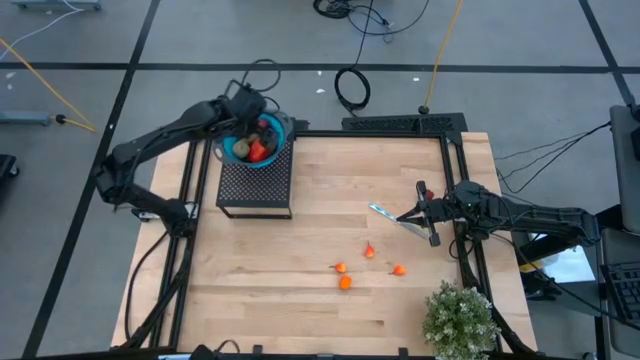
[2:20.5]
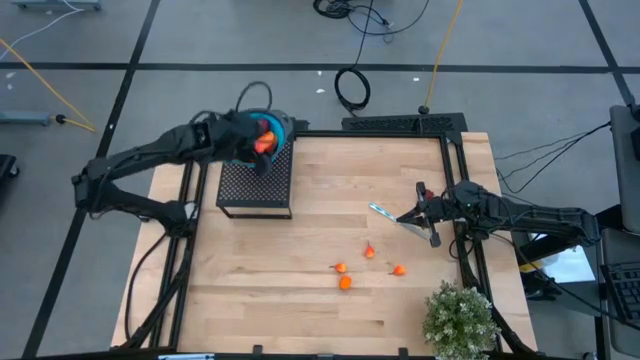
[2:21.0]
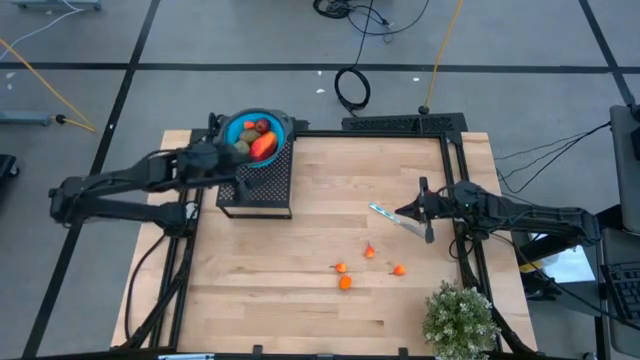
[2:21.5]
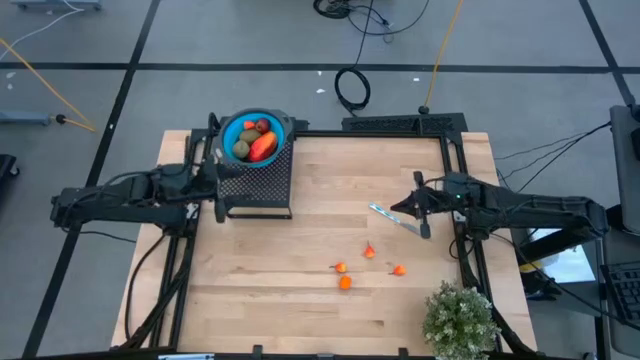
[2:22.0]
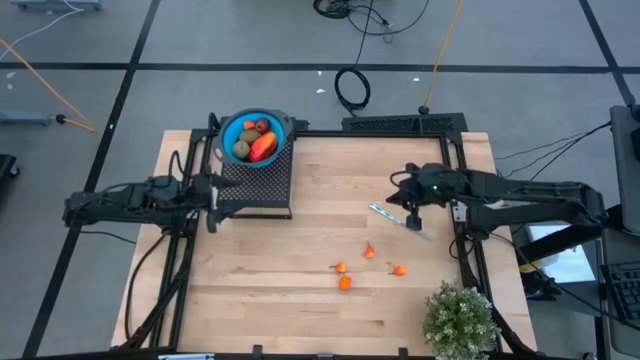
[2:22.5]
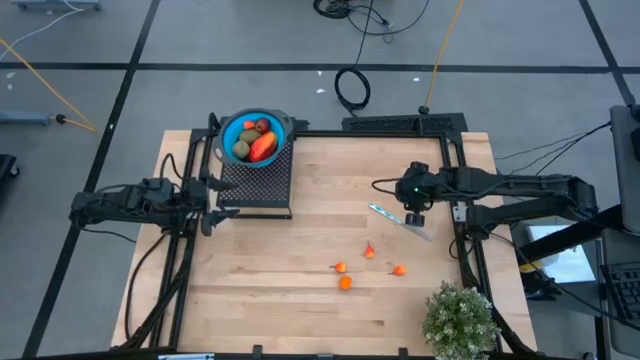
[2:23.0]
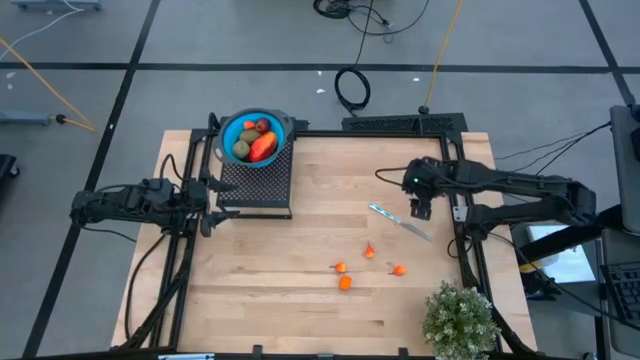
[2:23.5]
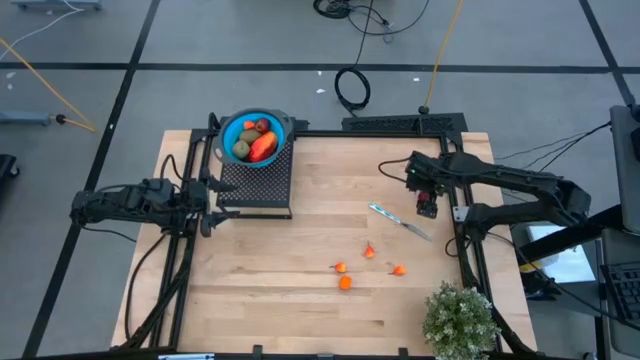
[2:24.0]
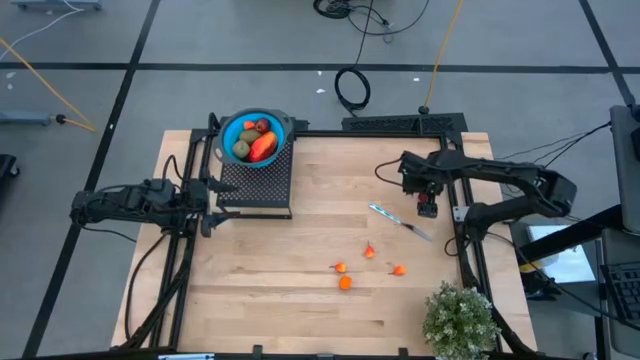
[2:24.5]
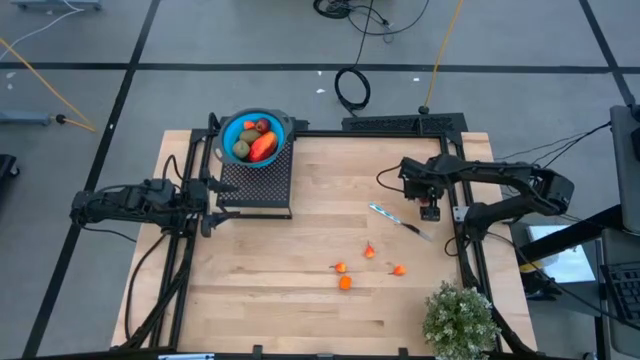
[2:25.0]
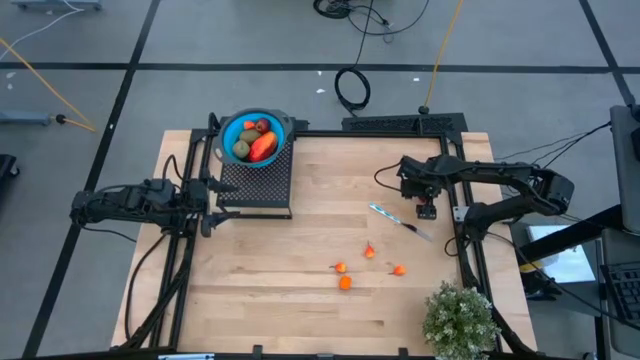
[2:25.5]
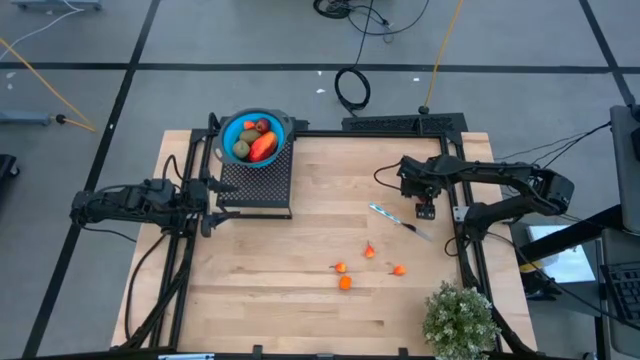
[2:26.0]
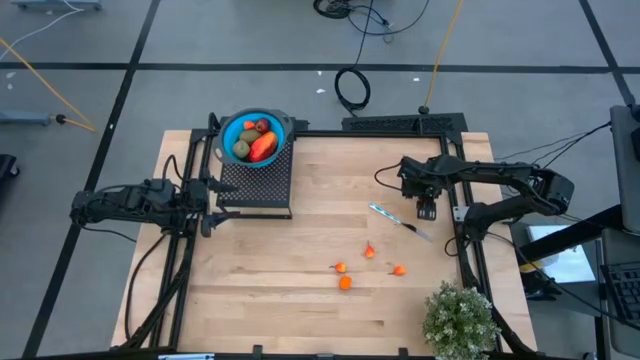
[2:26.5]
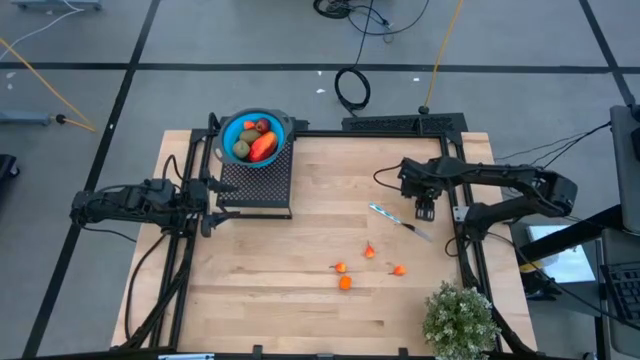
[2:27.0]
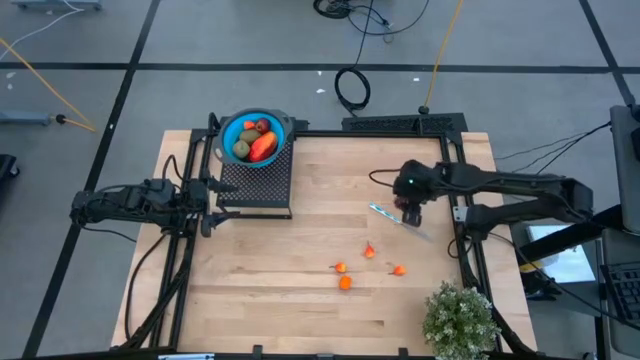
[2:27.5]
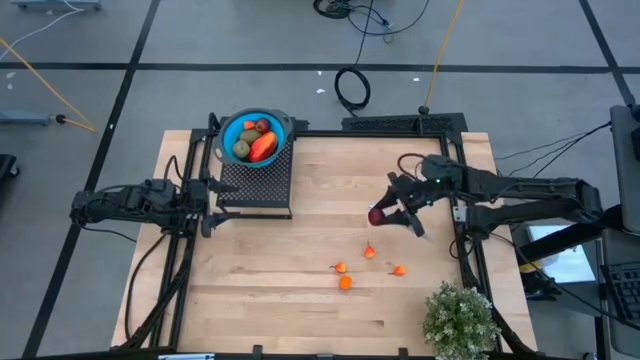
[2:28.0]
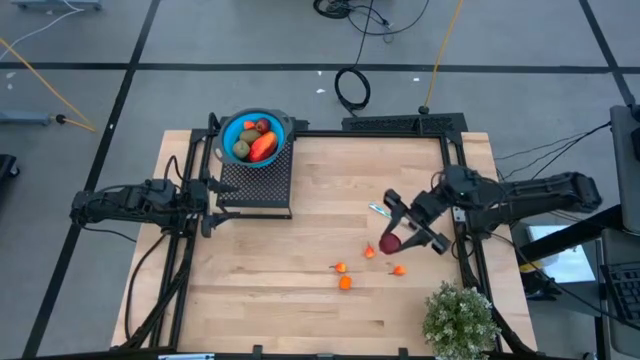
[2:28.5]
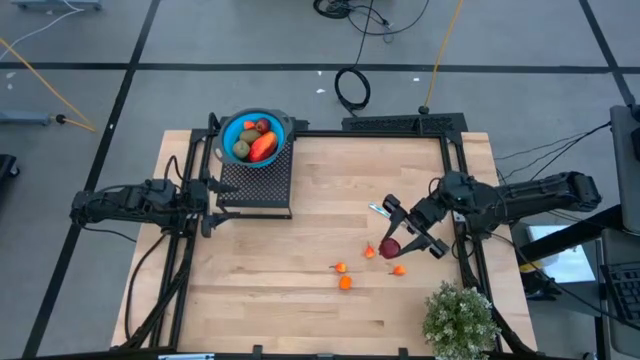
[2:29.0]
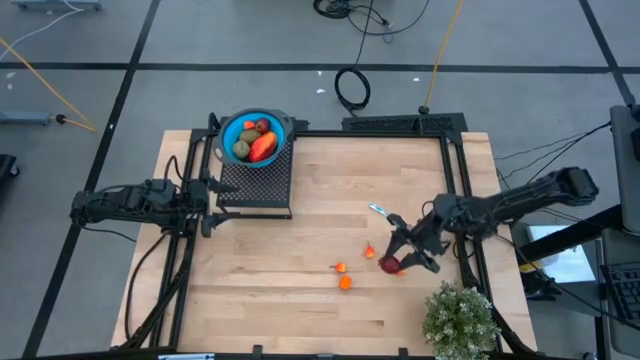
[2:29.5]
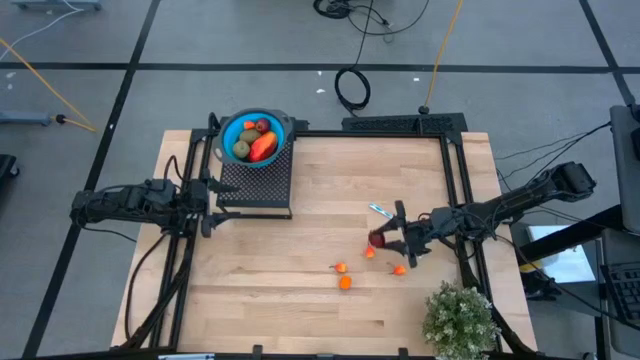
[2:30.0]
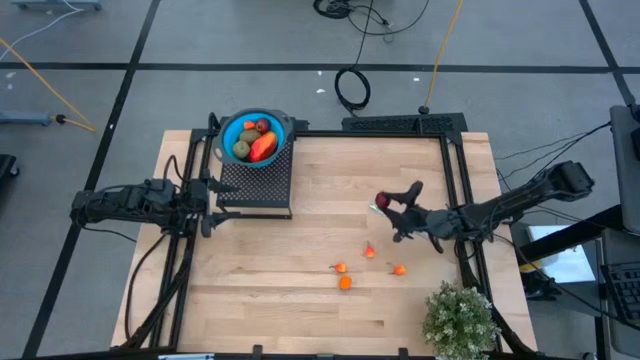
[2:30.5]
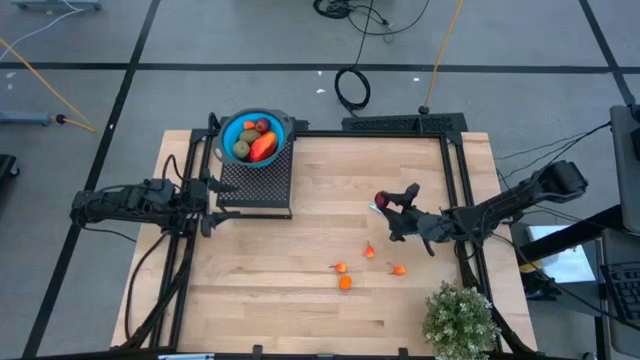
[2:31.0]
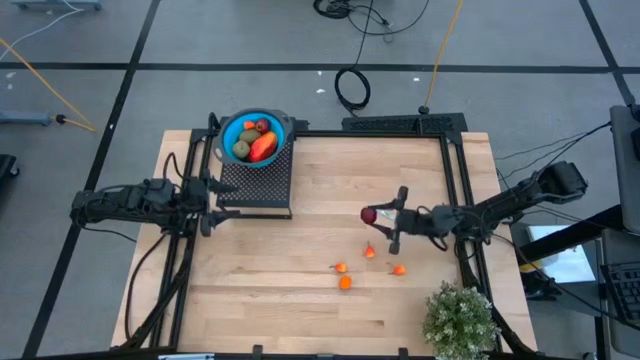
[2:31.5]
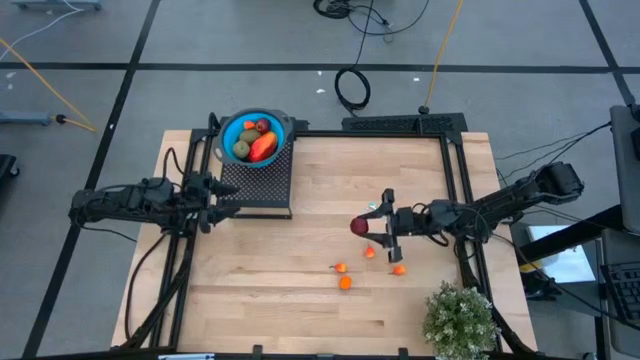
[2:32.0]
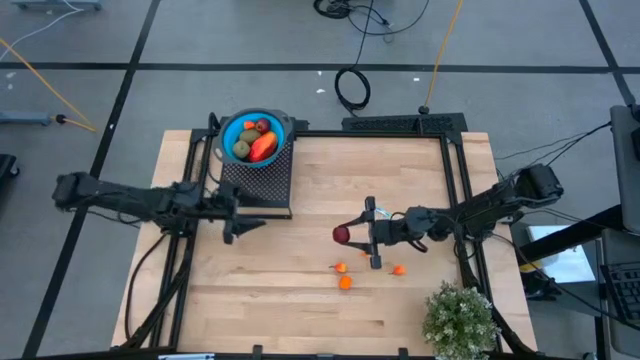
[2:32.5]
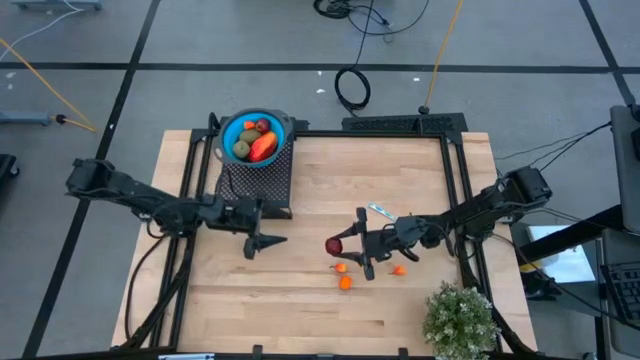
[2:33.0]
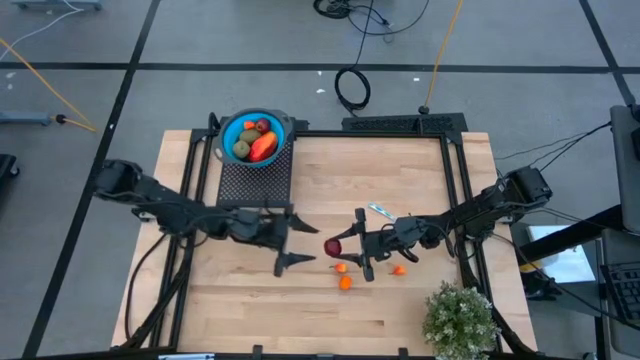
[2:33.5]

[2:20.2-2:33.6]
Task: Pick & Place Fruit
Put the red pomegranate into the blue strainer bowl on the shelf

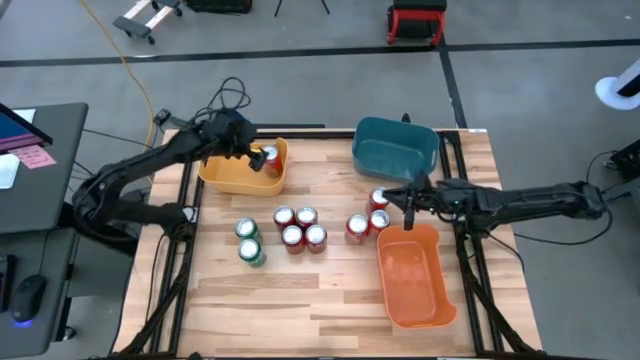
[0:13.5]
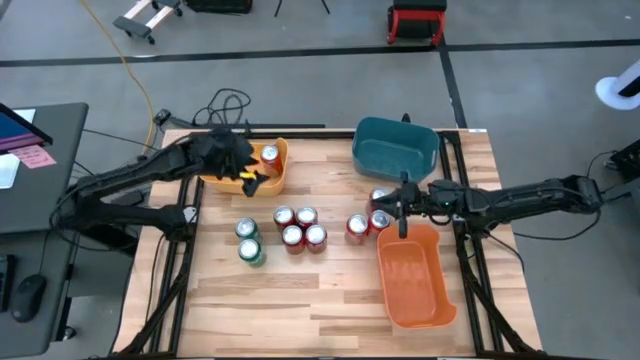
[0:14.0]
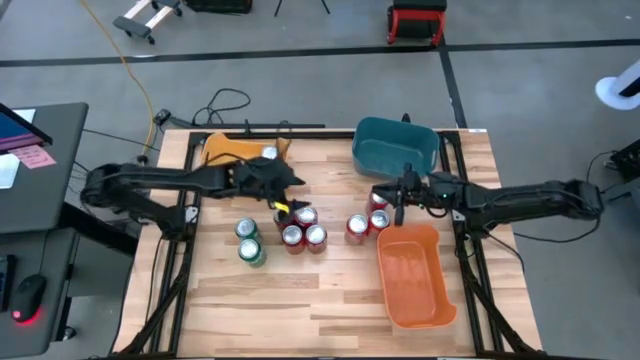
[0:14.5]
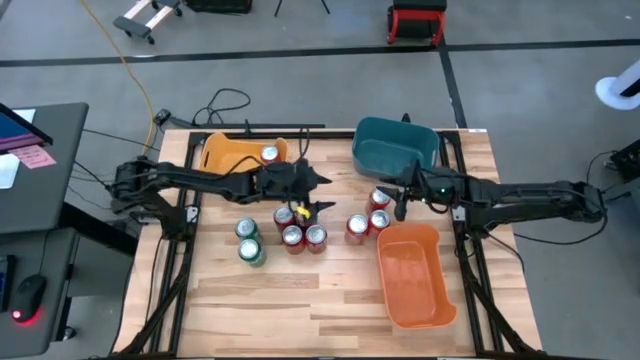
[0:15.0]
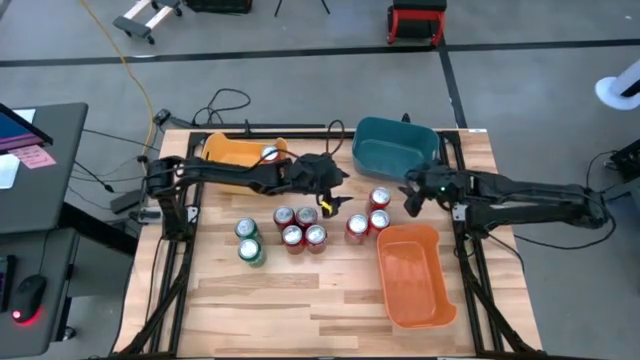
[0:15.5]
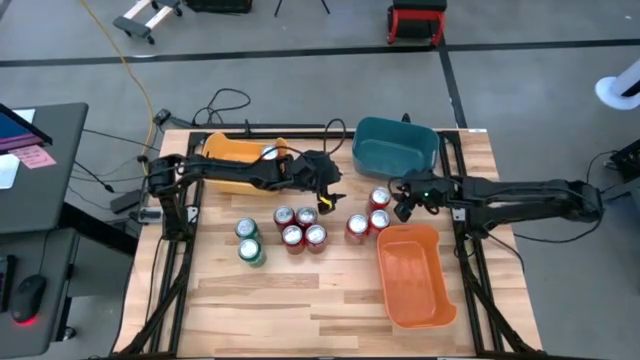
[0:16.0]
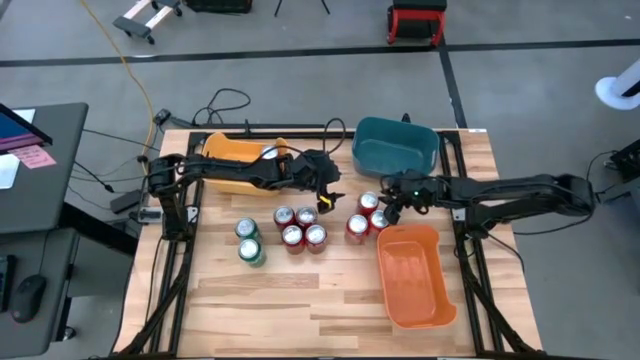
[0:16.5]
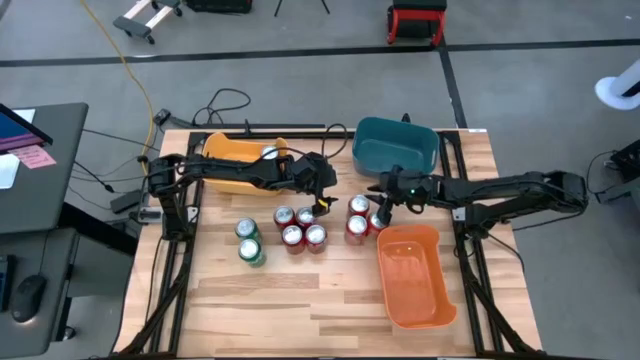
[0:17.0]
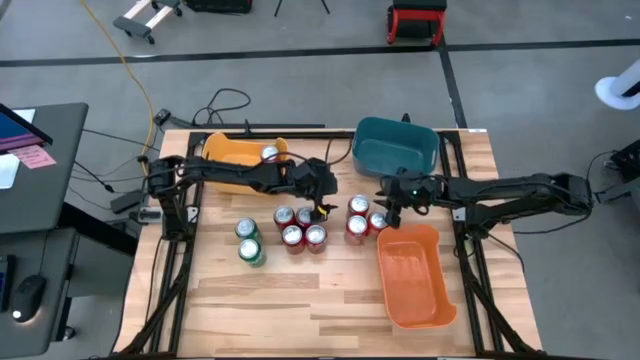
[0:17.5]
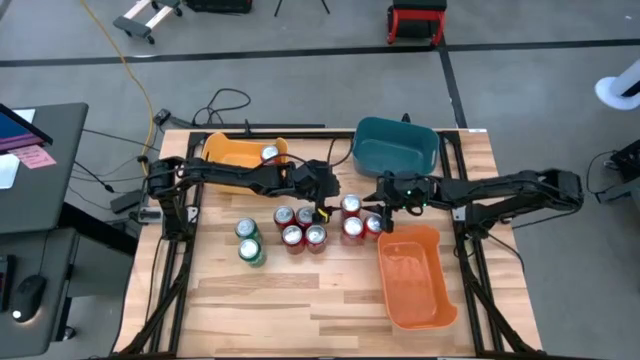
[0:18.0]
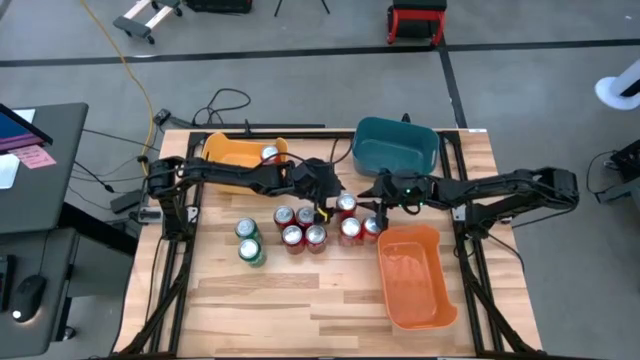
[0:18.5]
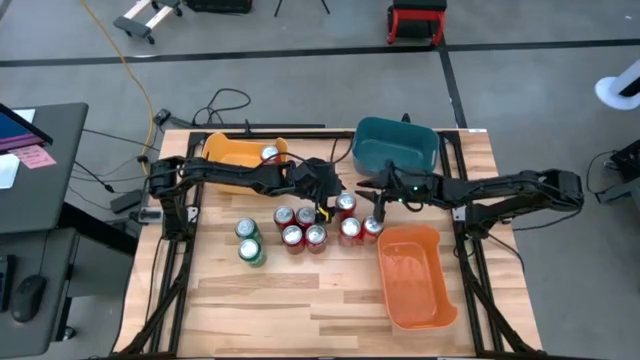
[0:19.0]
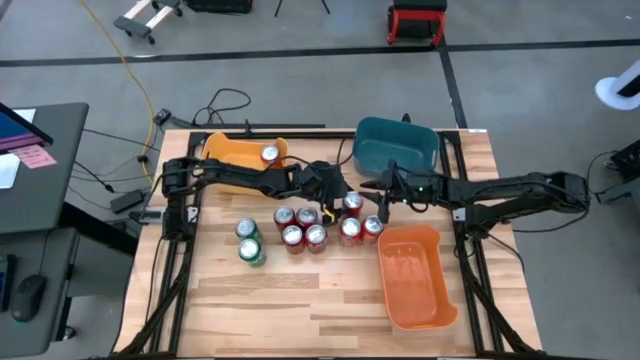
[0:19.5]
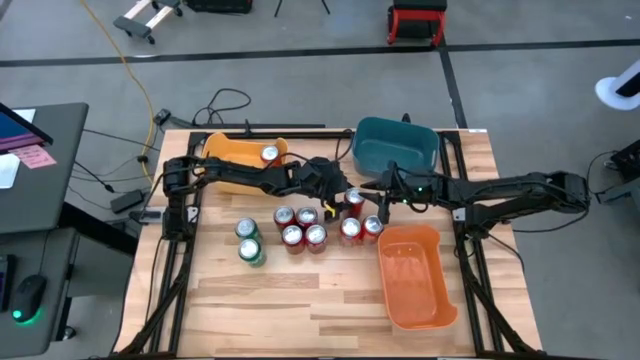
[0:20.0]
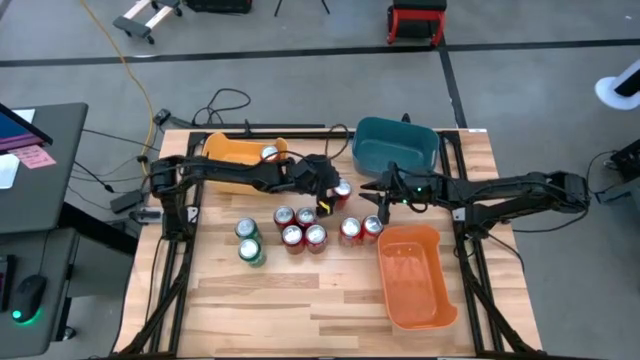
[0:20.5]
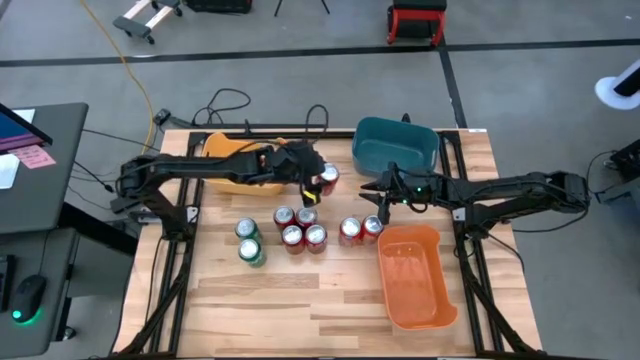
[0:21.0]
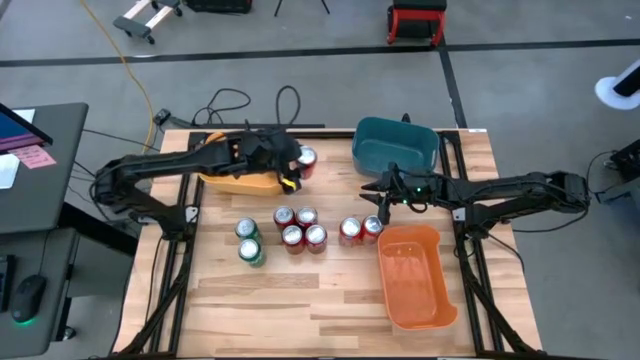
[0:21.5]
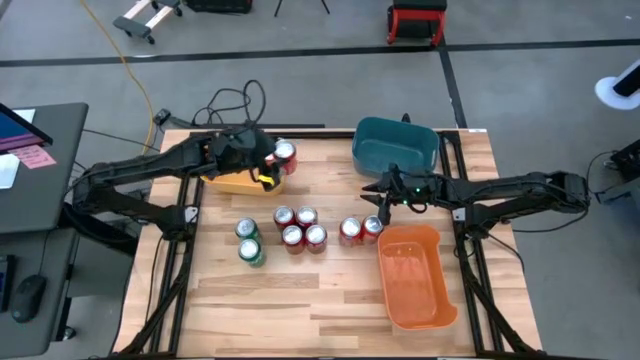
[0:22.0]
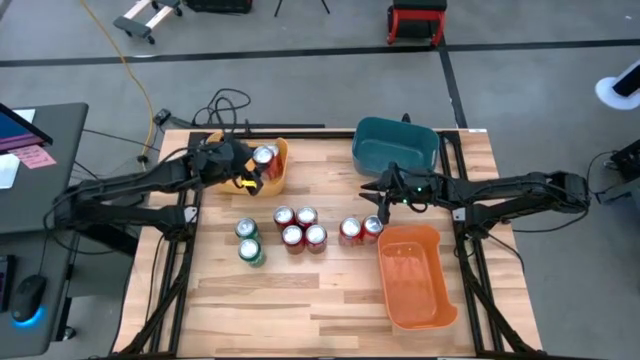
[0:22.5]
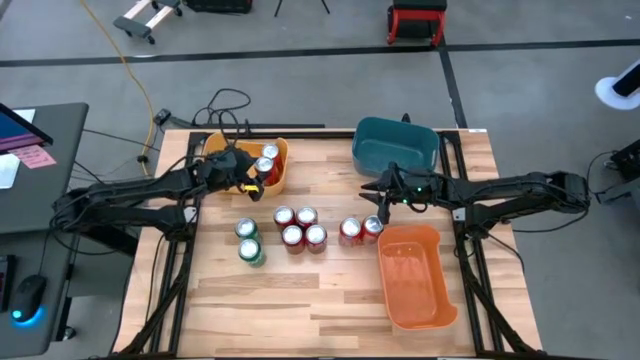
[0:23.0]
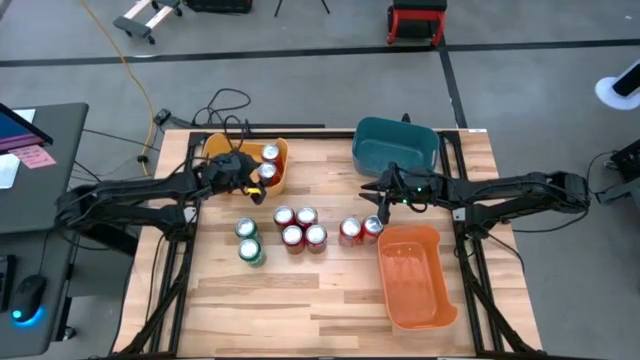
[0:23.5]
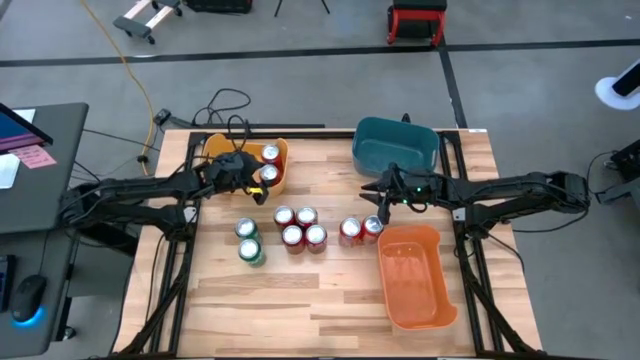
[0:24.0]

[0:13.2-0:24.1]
Task: Sort soda cans
Put the top right orange soda can into the yellow bin
